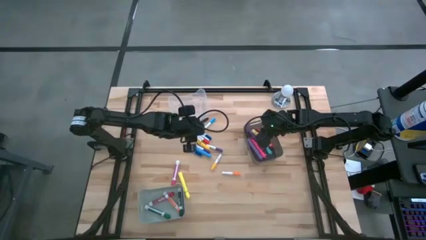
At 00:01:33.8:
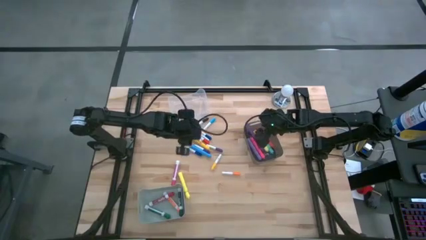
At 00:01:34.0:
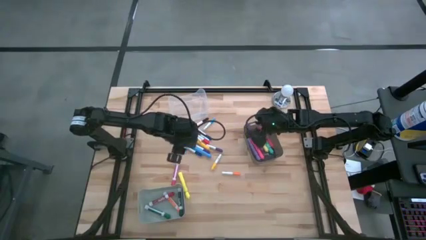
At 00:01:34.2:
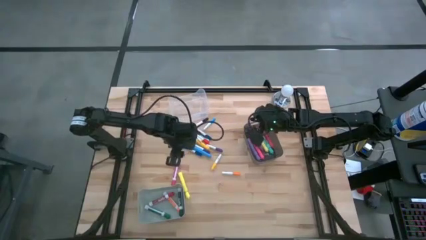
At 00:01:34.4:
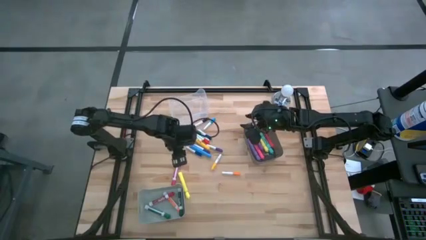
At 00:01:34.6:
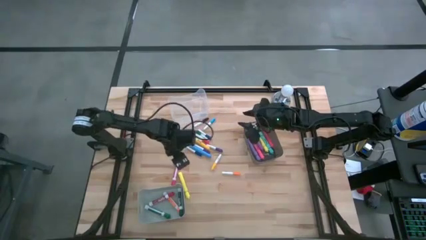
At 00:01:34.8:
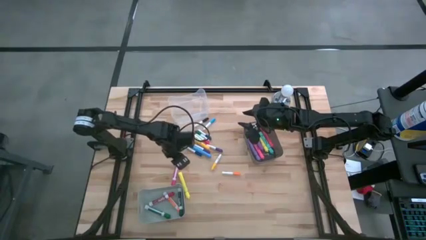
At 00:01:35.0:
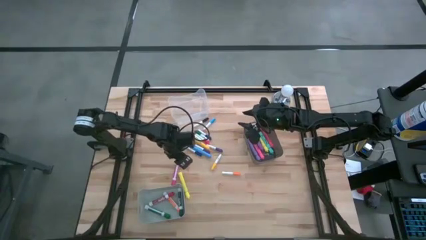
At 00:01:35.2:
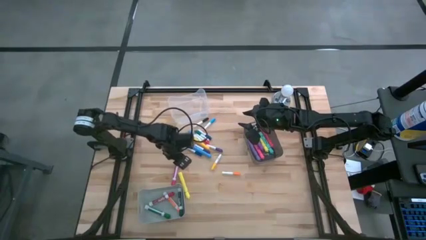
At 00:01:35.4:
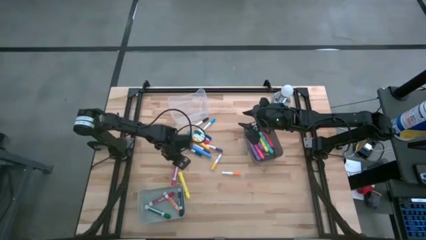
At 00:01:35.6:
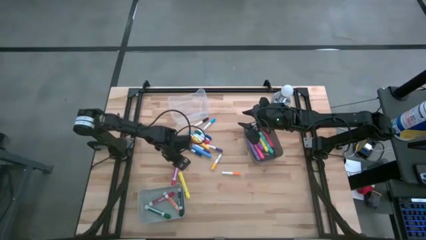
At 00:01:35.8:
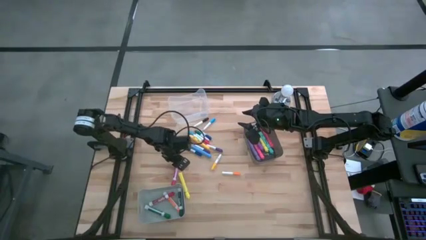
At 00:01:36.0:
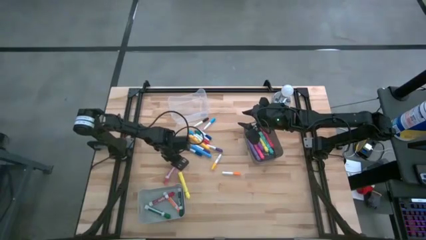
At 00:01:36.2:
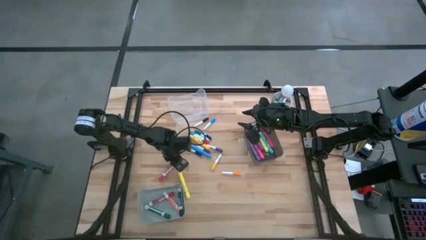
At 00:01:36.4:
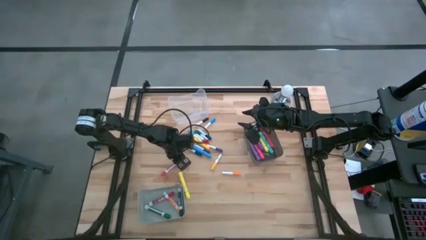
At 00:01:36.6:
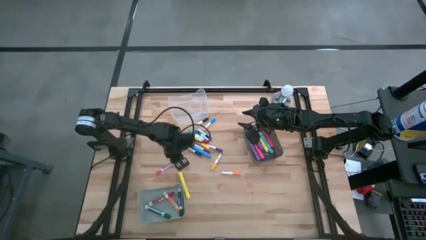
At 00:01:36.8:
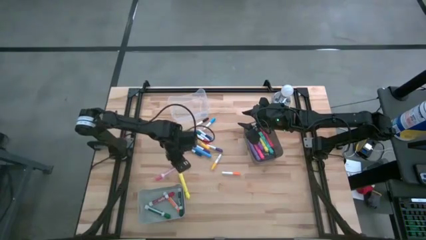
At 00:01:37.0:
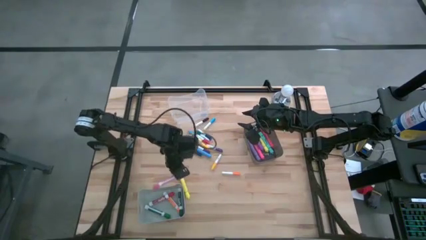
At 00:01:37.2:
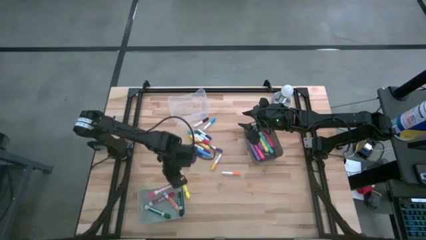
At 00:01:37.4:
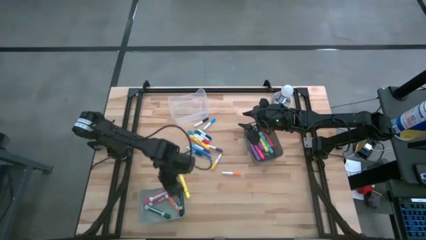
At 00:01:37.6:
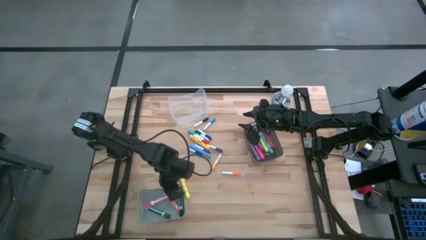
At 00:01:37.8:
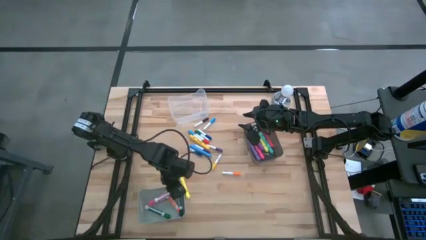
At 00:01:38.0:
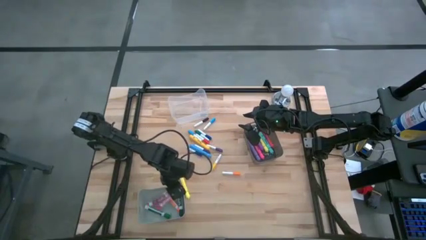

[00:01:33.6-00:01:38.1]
Task: Pick & Place Markers
Put the pink marker pen into the gray bin

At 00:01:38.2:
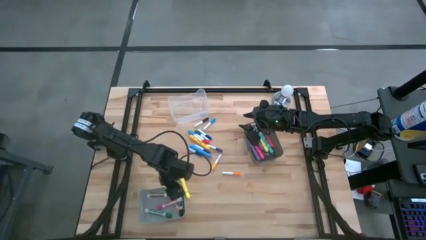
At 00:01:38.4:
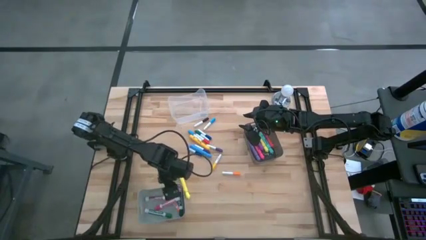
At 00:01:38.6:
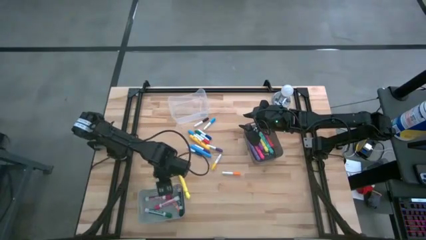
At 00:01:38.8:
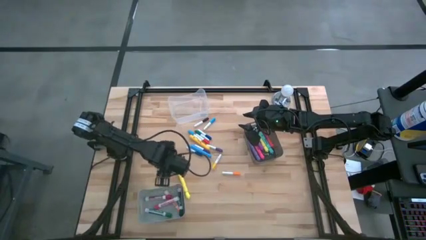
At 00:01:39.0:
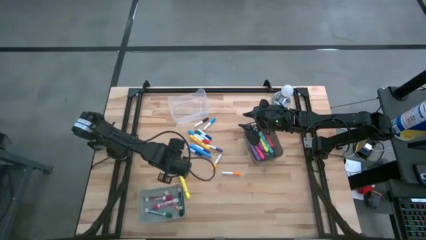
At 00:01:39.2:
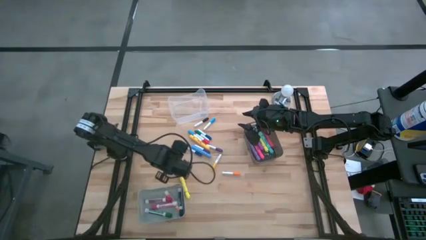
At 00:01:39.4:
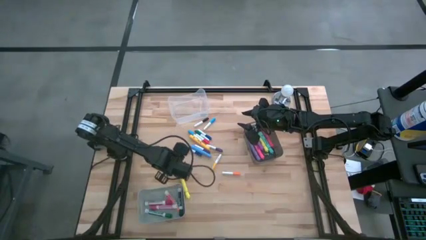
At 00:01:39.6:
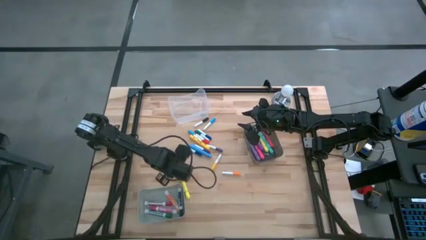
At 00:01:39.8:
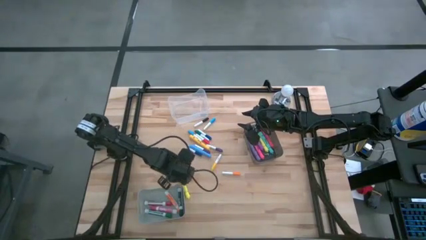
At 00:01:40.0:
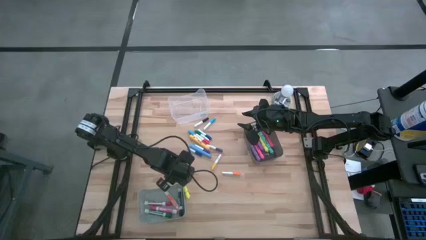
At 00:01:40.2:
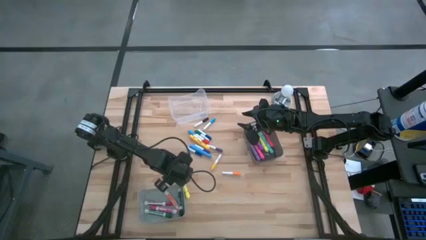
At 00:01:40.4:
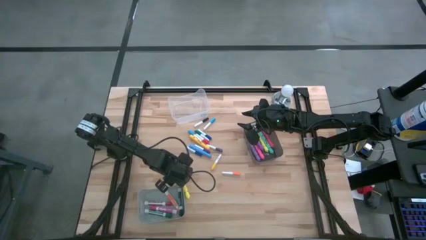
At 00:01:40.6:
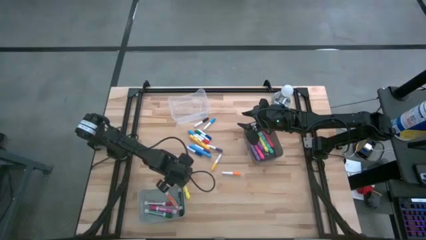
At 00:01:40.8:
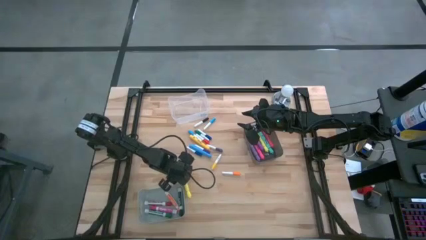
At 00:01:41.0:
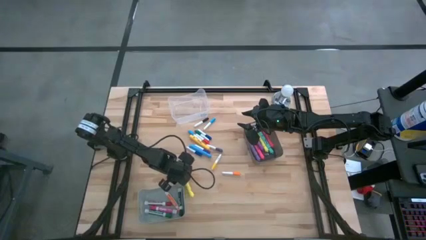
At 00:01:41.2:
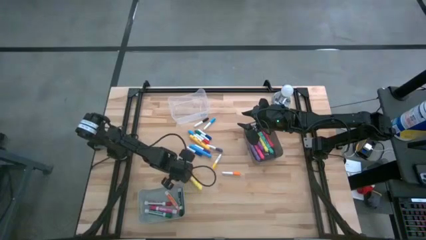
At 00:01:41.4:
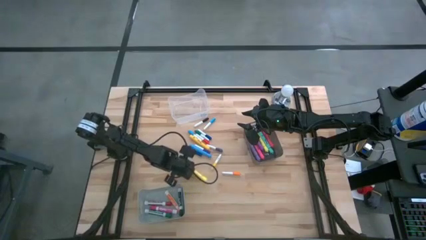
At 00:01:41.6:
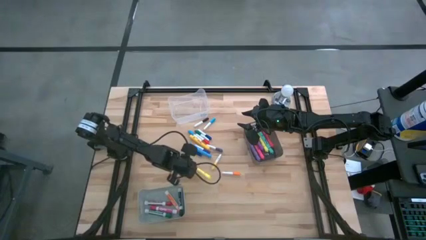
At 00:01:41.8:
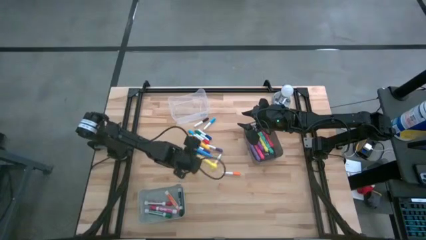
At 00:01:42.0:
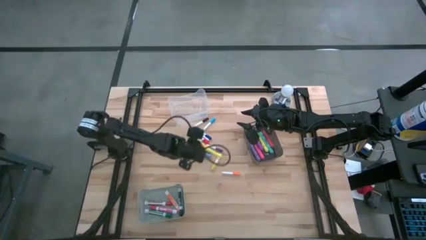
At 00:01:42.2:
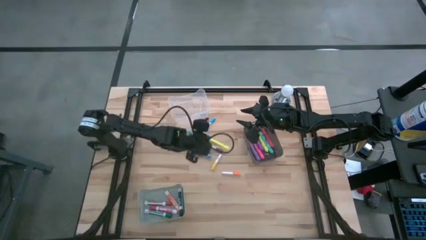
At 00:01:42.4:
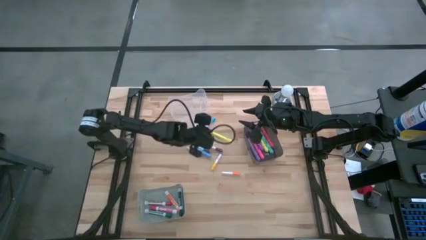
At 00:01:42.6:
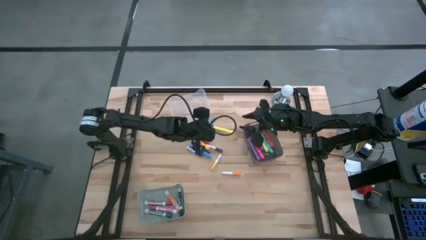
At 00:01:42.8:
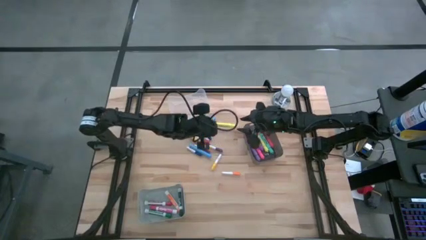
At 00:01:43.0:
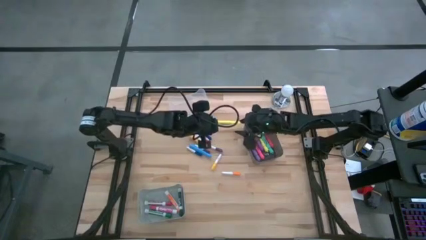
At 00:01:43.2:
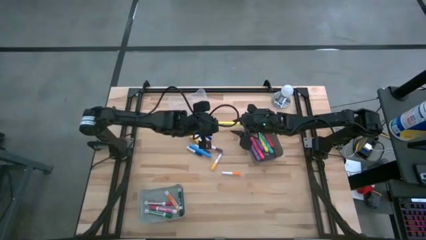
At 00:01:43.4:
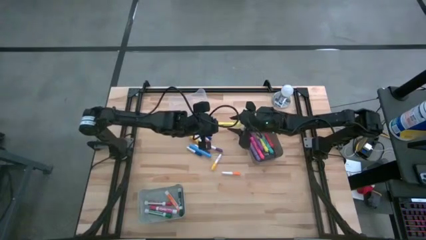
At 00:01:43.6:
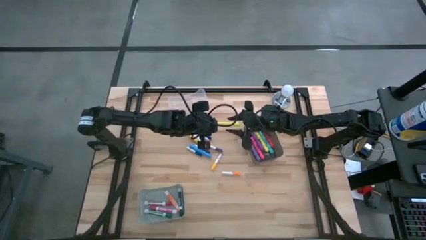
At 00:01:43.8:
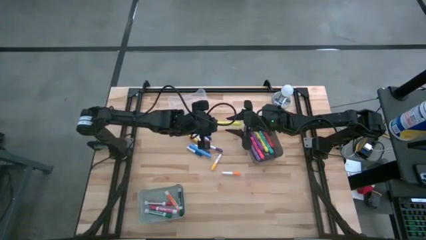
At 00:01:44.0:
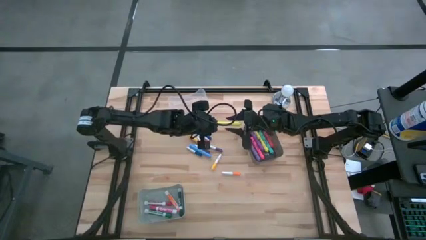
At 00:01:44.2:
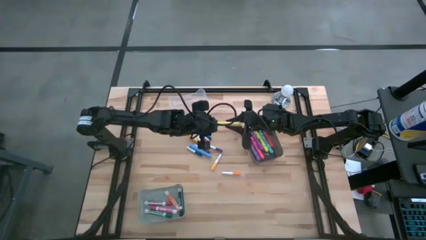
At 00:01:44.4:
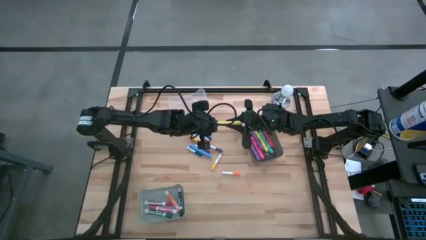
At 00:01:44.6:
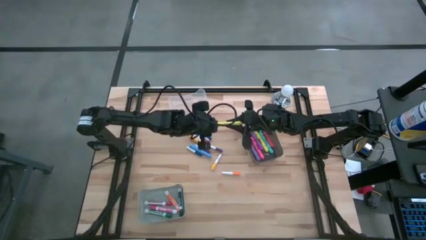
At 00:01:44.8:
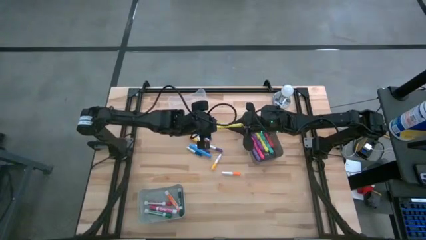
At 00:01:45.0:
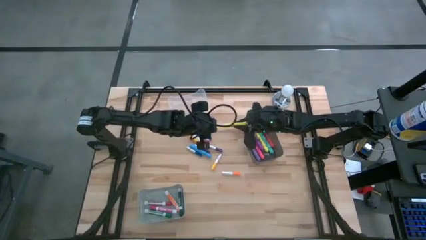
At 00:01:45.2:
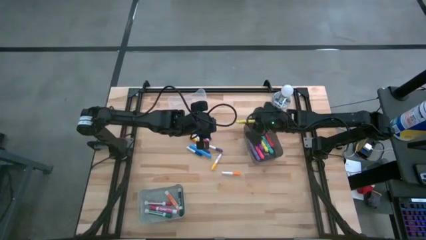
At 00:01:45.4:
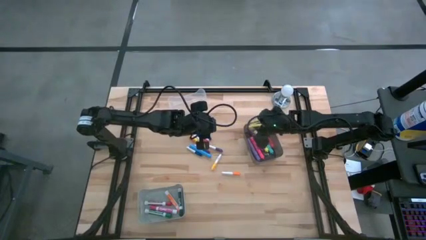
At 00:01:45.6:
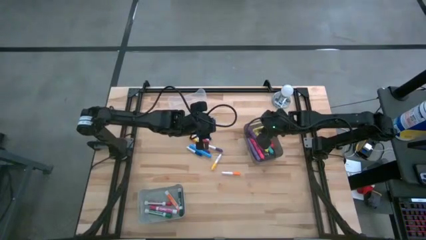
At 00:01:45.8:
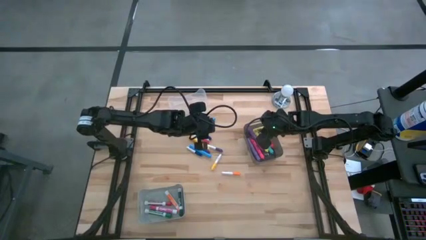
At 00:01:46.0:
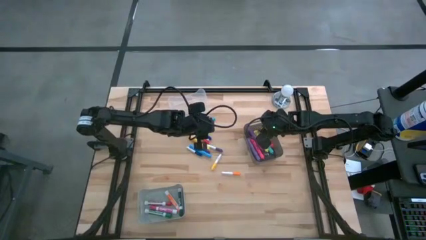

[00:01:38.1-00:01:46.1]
Put the yellow highlighter pen into the black bin

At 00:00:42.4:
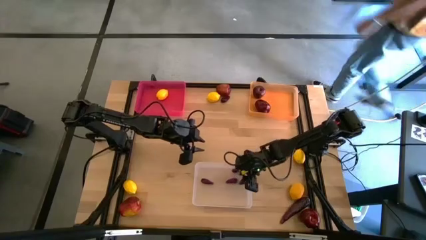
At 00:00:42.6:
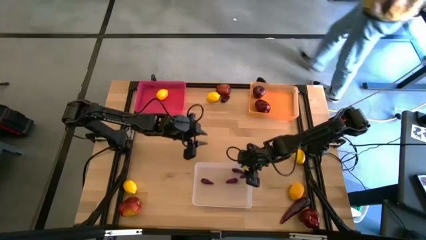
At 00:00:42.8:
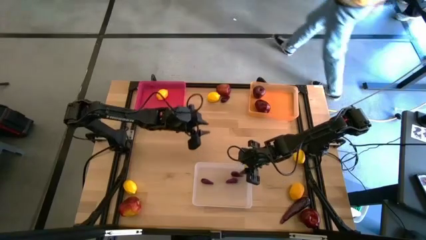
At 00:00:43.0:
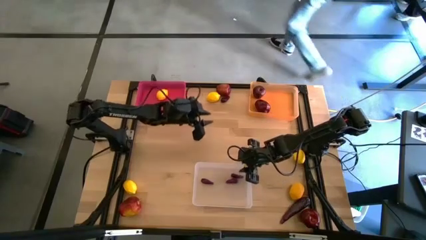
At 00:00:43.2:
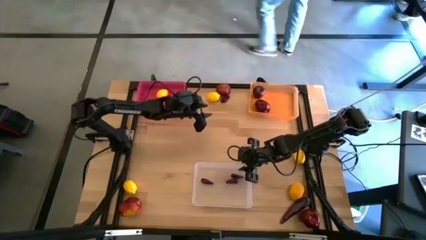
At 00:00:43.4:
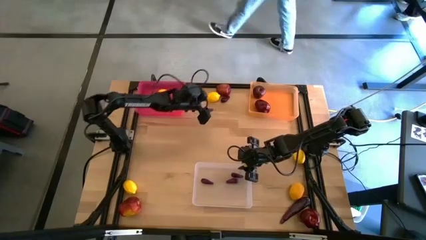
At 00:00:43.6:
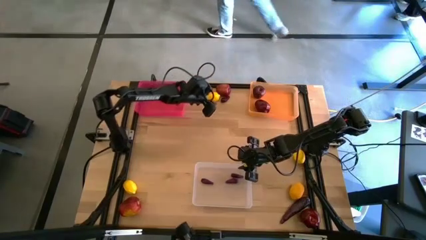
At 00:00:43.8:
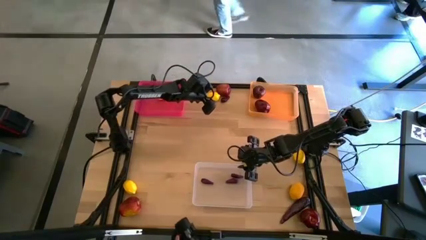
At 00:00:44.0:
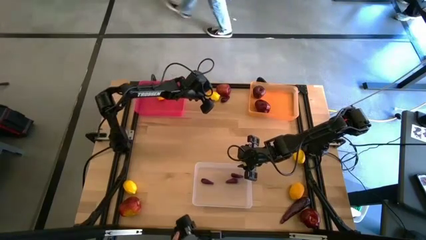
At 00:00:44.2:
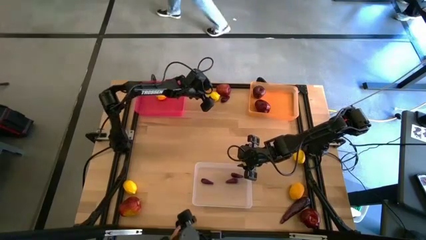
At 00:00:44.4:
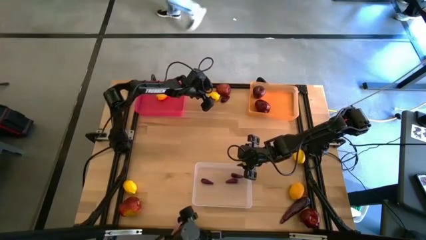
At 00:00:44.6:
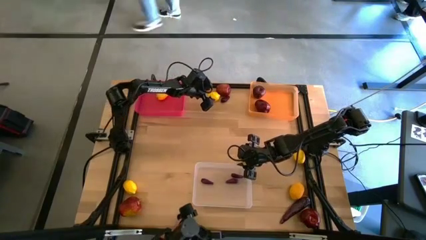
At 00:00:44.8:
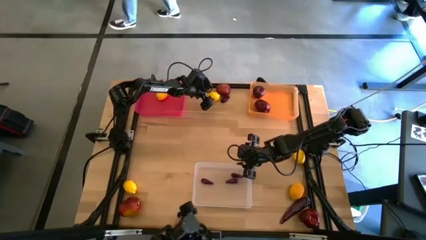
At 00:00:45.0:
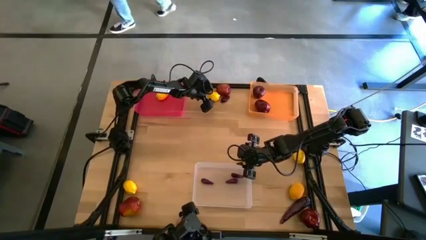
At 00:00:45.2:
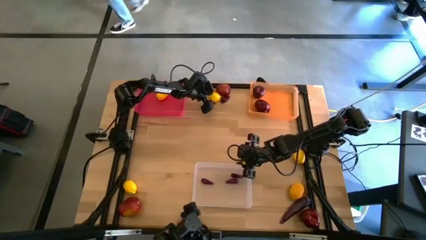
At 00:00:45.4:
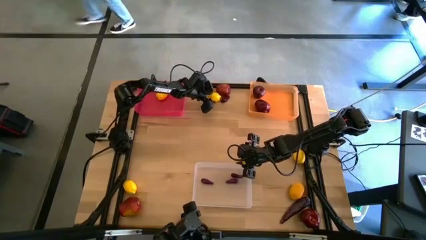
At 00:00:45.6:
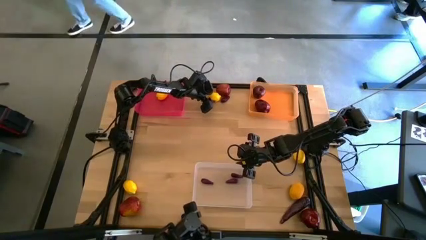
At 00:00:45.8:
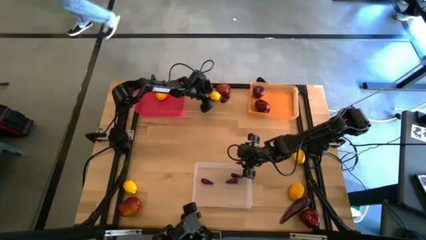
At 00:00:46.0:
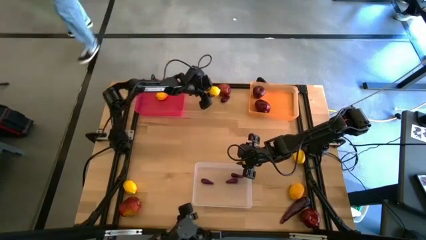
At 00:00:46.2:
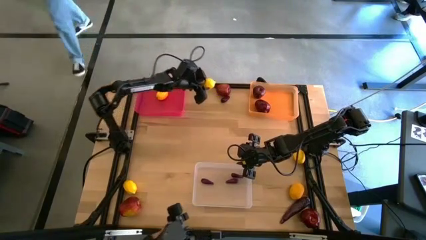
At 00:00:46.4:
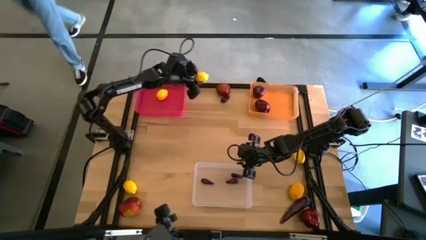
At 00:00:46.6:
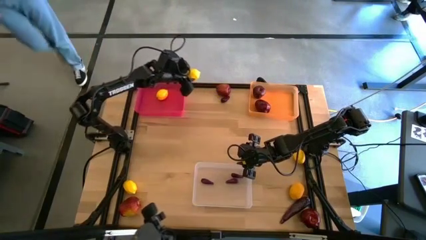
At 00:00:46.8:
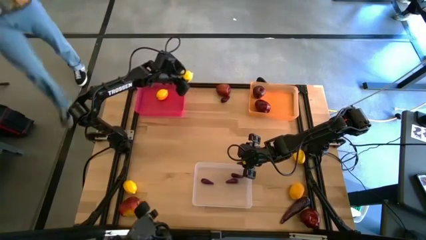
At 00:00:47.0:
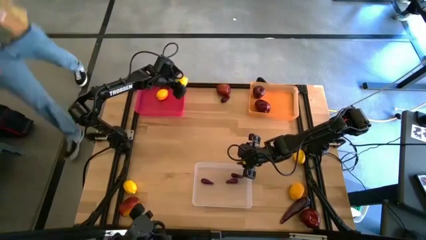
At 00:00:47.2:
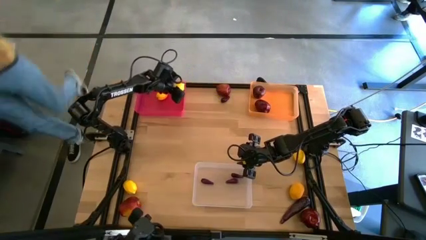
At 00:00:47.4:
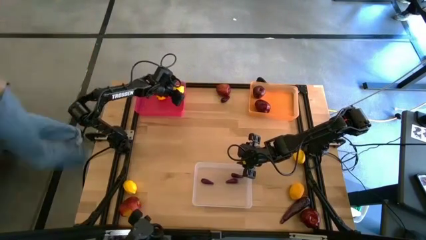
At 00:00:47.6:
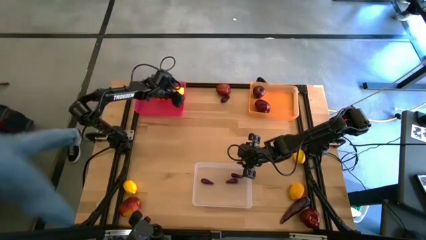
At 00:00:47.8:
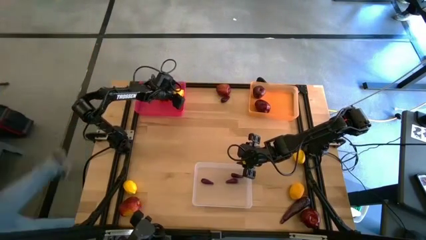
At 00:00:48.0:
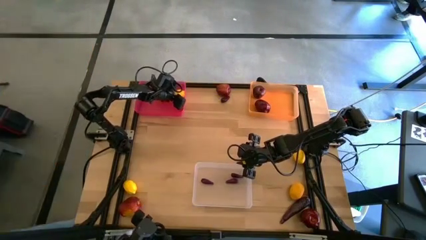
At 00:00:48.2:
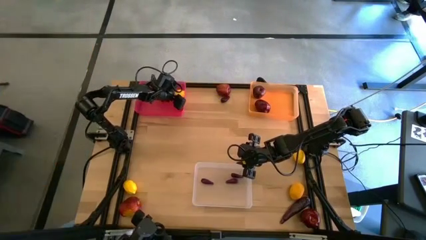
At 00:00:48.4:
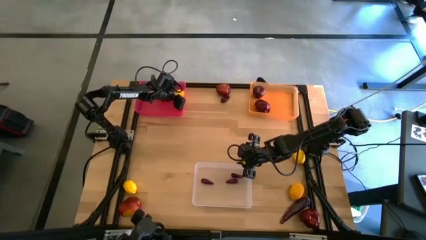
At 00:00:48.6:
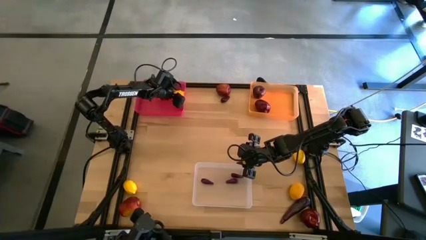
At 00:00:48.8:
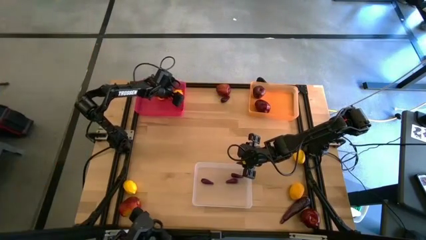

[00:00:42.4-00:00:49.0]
Task: Sort produce into baskets
Put the lemon into the red bin
